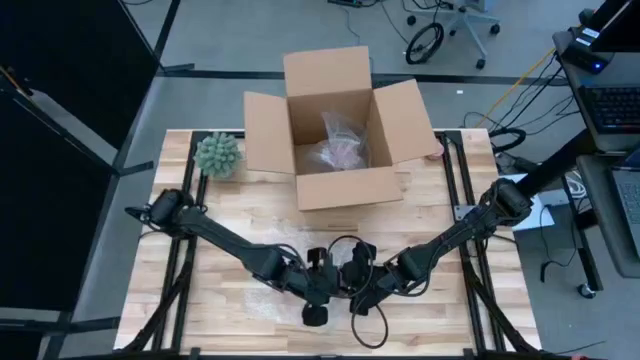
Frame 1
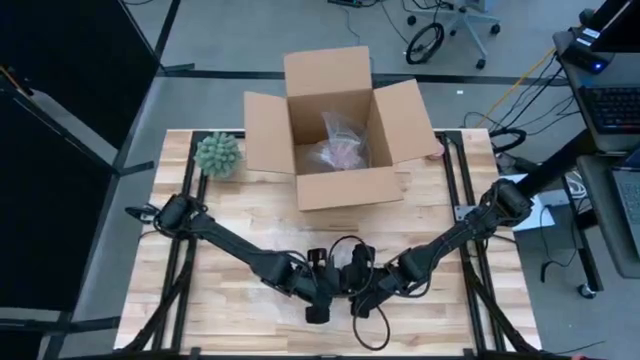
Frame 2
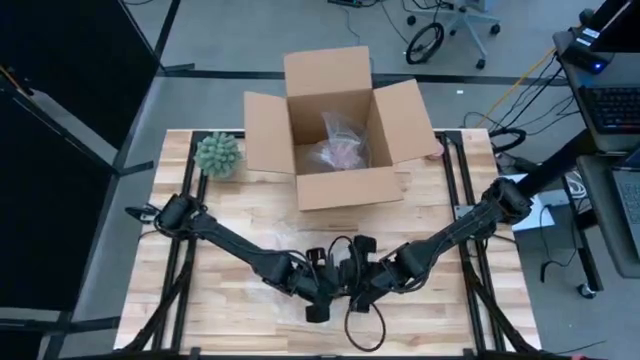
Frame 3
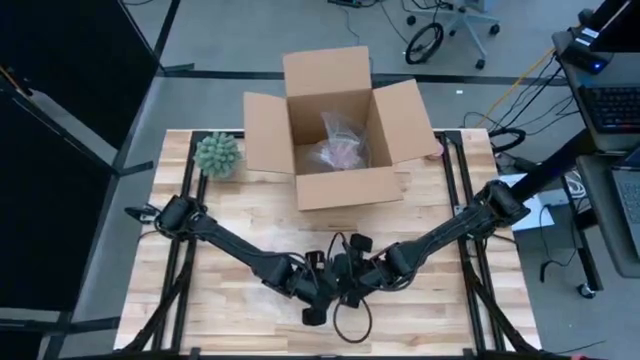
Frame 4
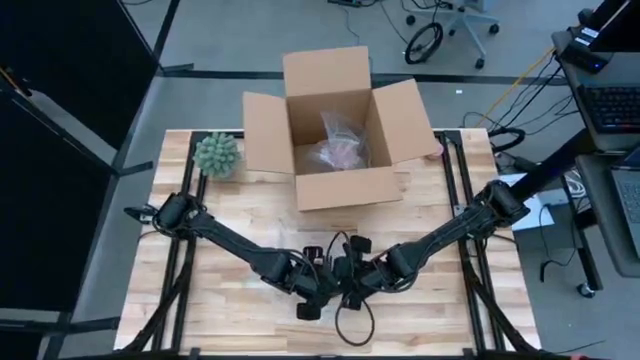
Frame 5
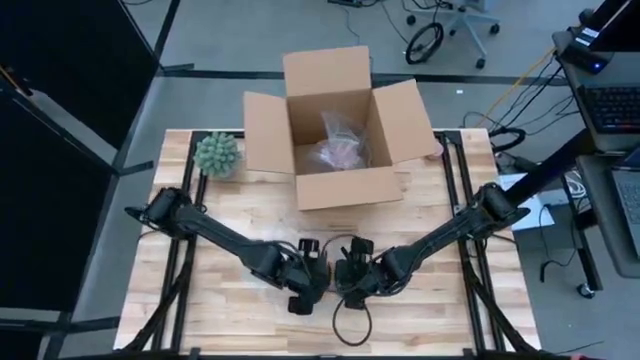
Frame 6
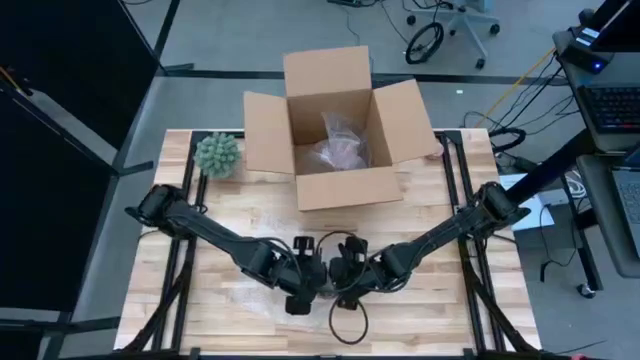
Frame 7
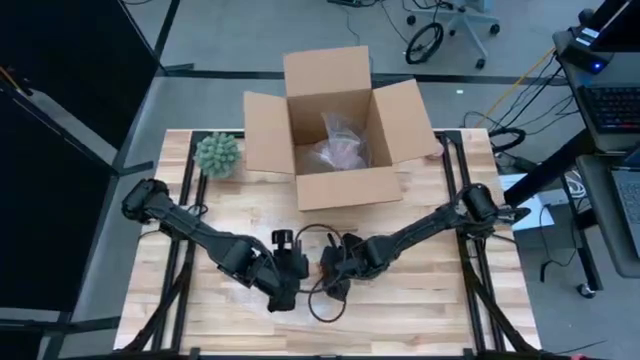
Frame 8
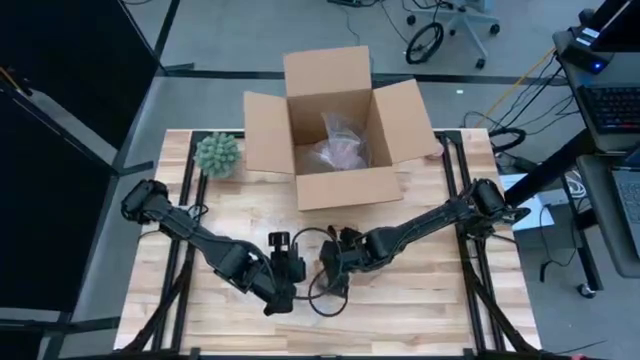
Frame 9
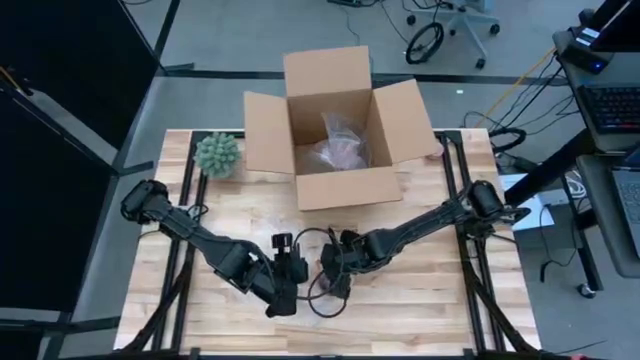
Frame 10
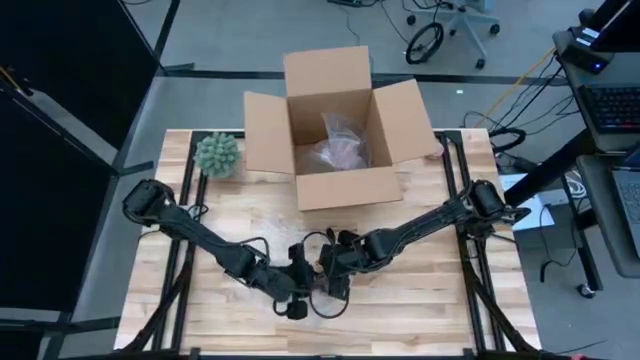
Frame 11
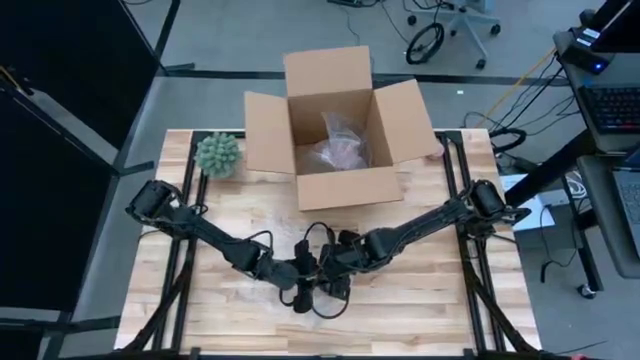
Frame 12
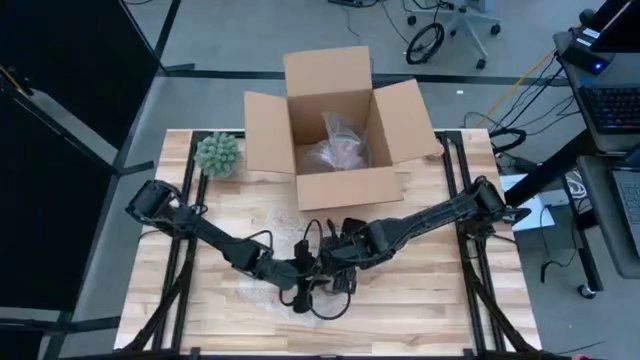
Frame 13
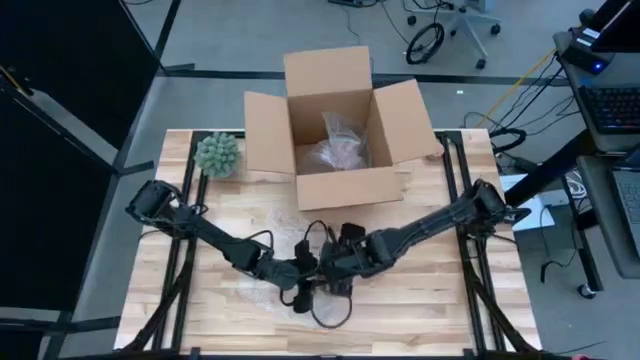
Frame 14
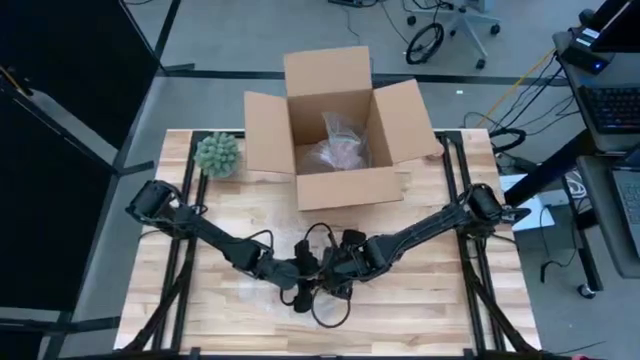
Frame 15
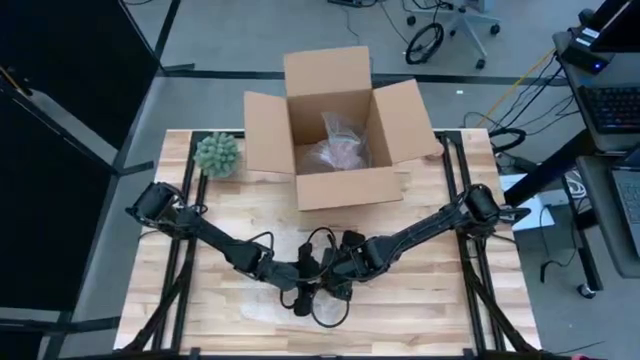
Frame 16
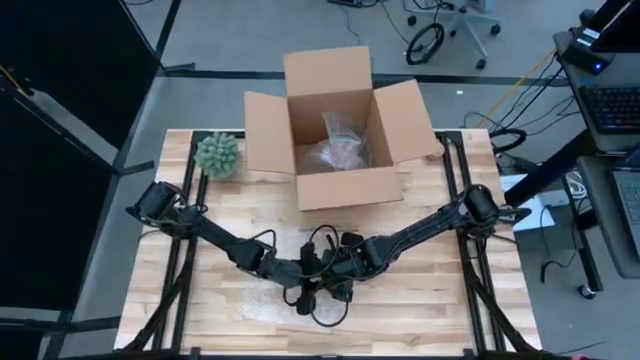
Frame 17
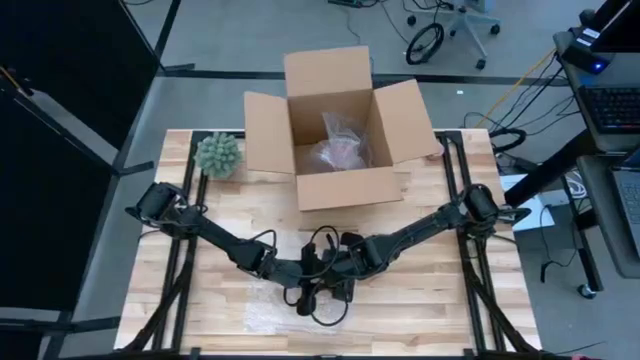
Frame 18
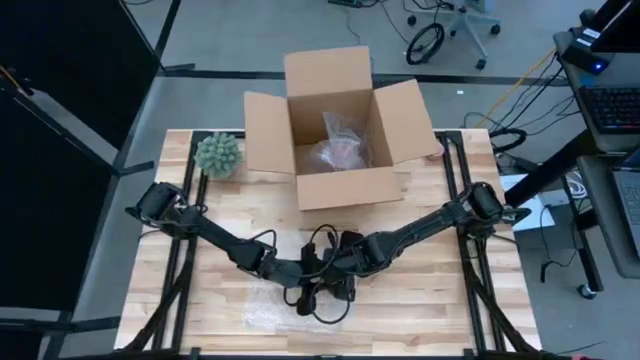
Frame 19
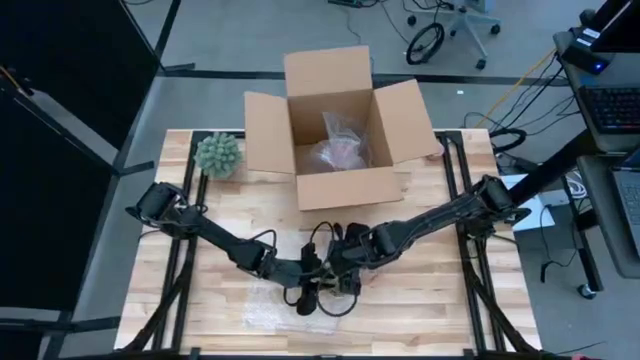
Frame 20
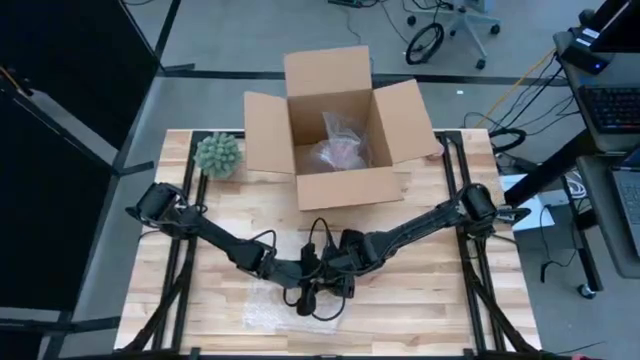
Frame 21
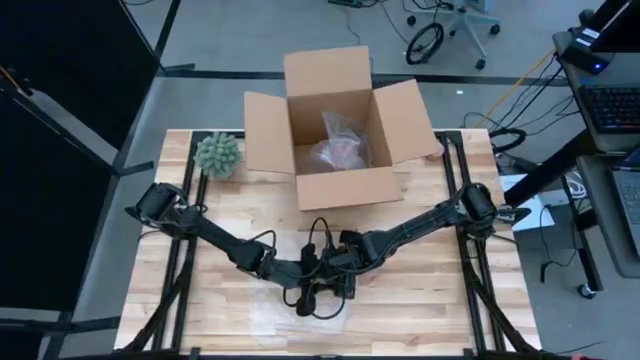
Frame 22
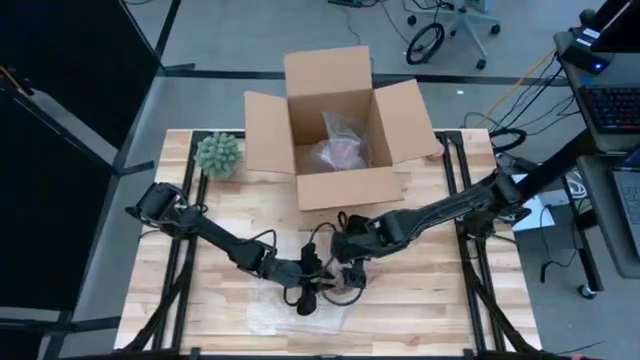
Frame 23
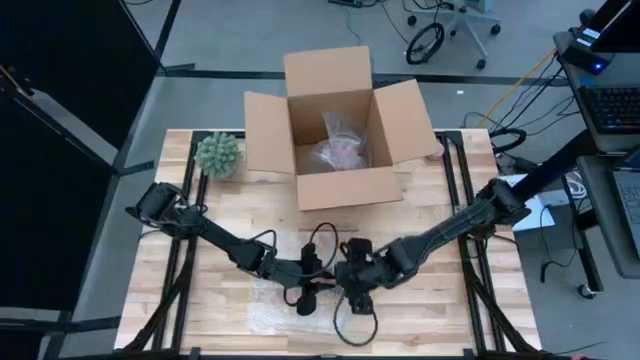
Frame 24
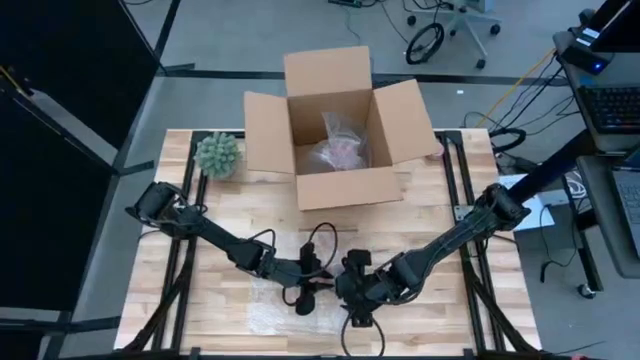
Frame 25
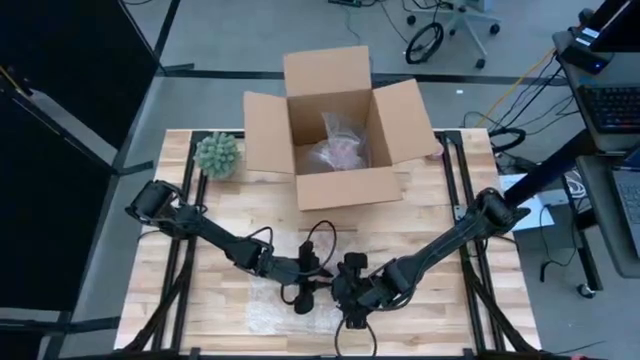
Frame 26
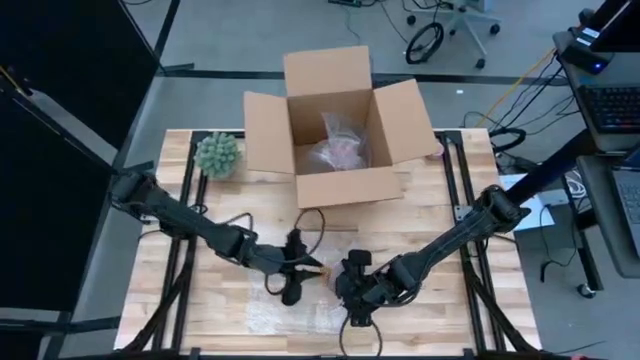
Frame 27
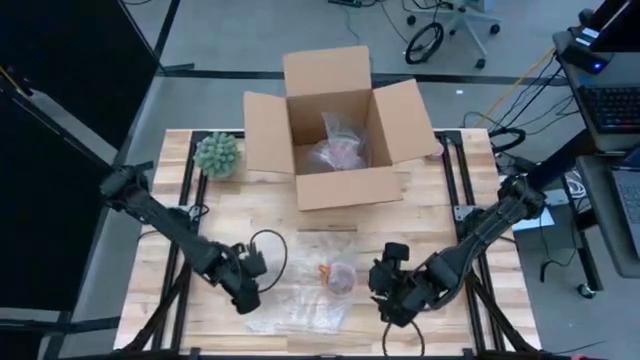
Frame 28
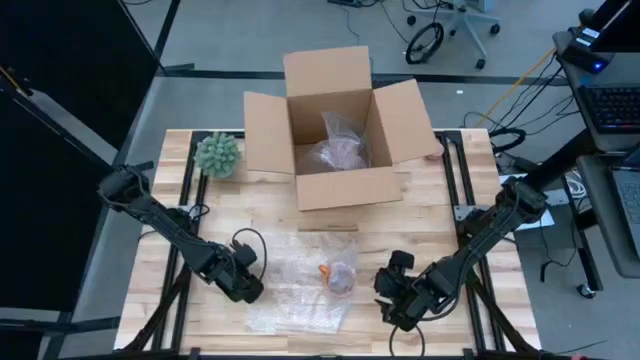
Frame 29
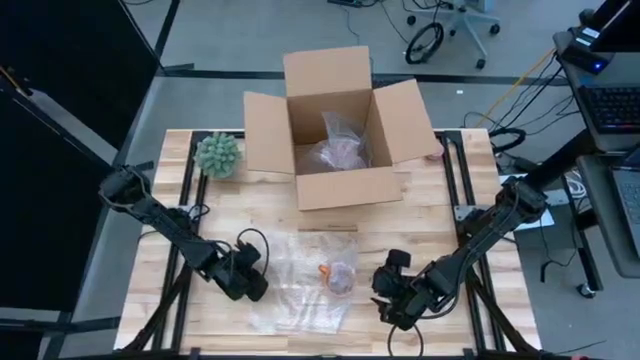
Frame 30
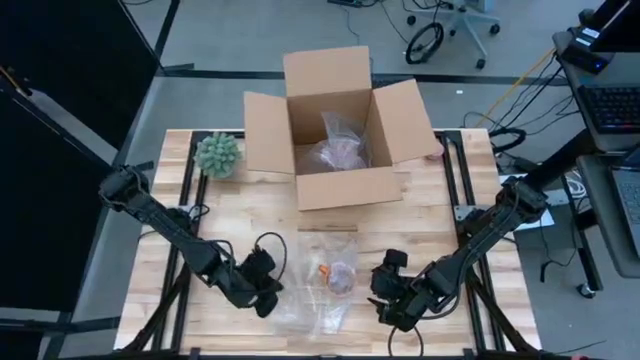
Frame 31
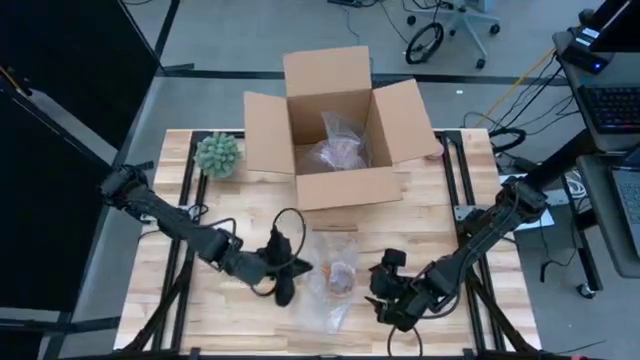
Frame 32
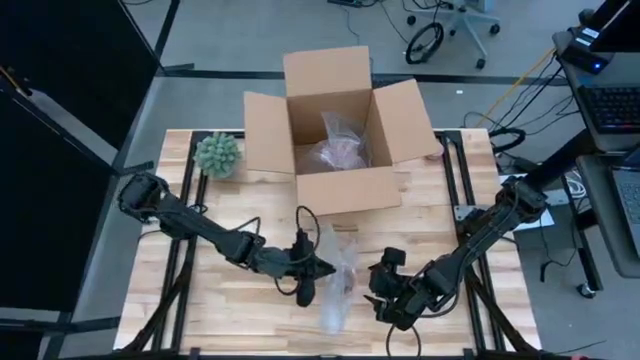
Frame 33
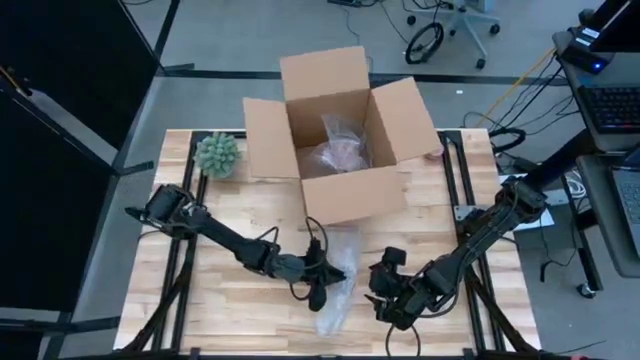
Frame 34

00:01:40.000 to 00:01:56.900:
Task: wrap mug
Wrap the orange mug with the left bubble wrap

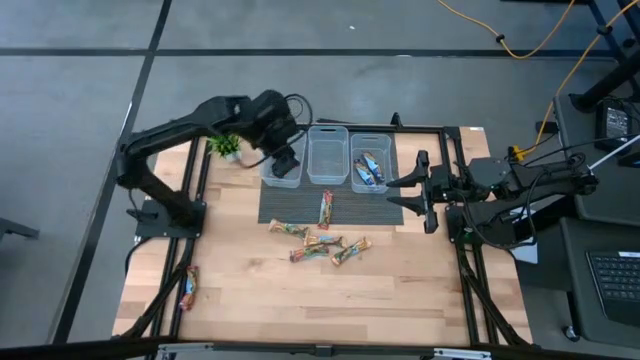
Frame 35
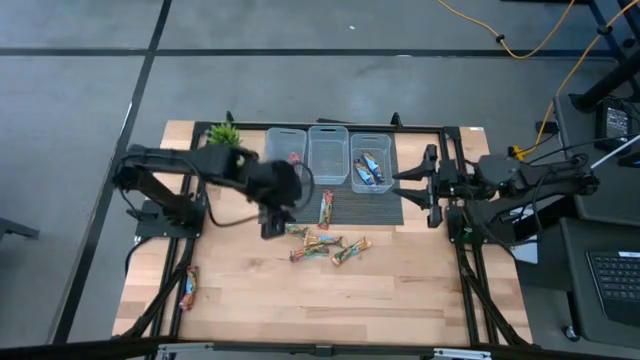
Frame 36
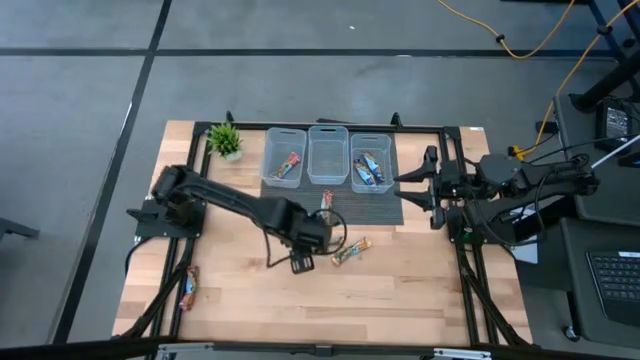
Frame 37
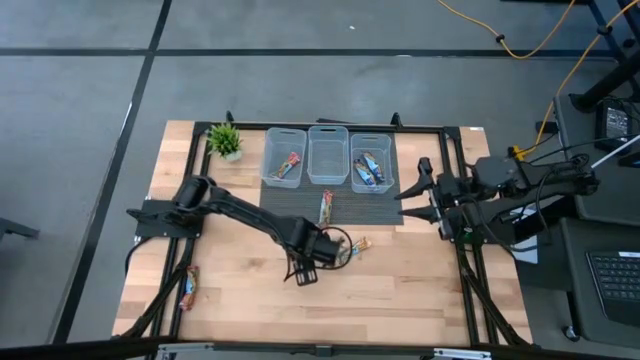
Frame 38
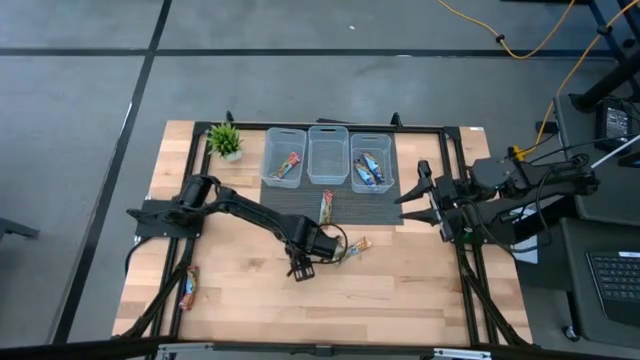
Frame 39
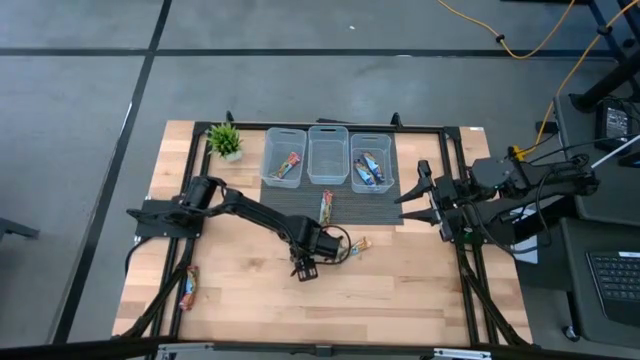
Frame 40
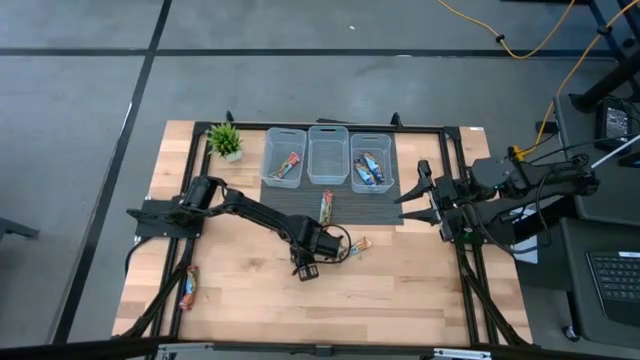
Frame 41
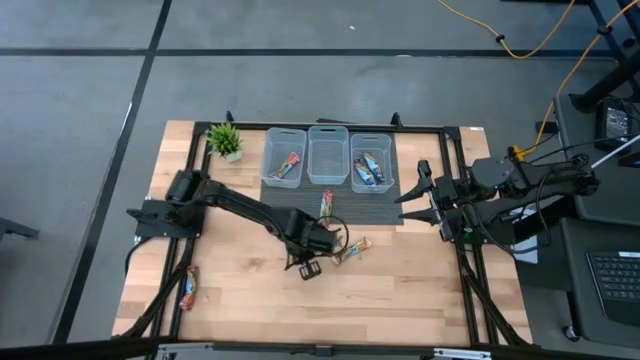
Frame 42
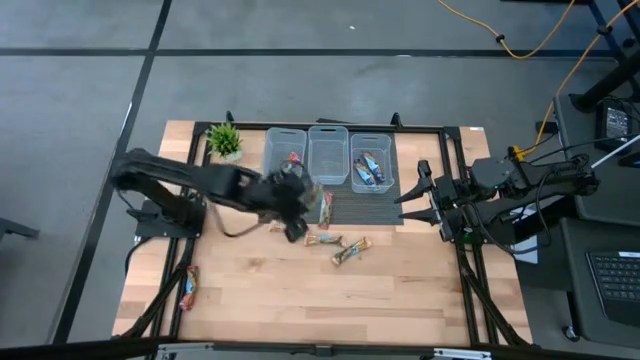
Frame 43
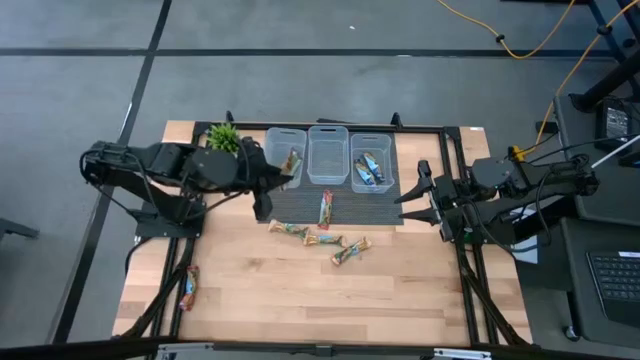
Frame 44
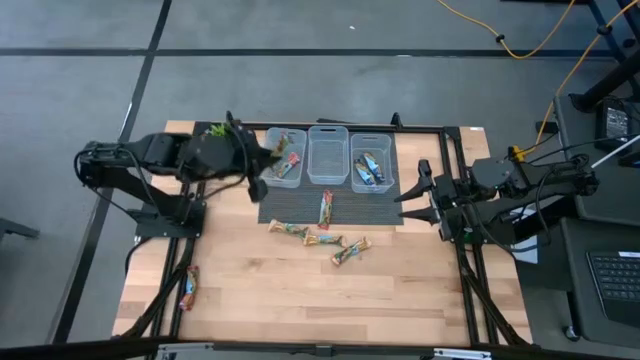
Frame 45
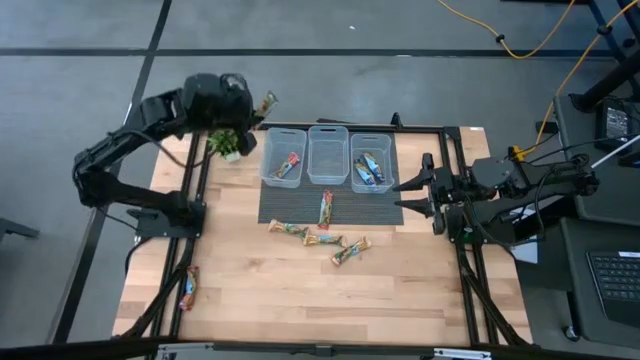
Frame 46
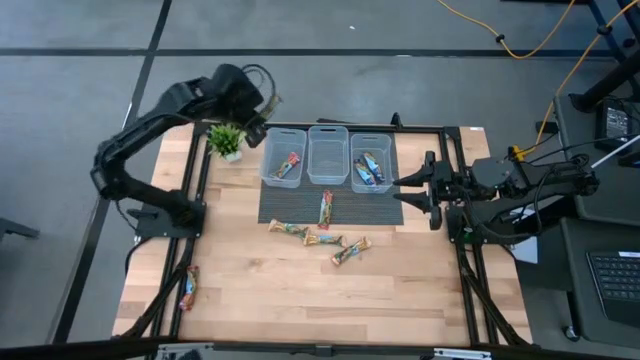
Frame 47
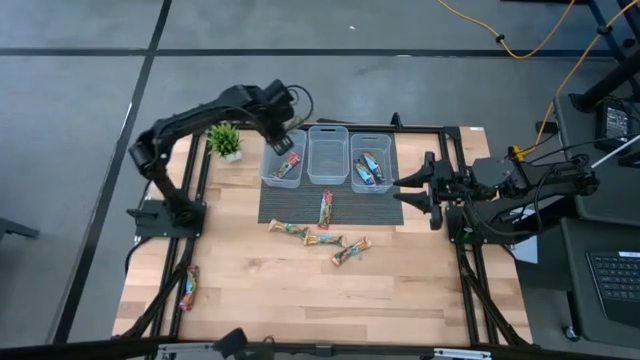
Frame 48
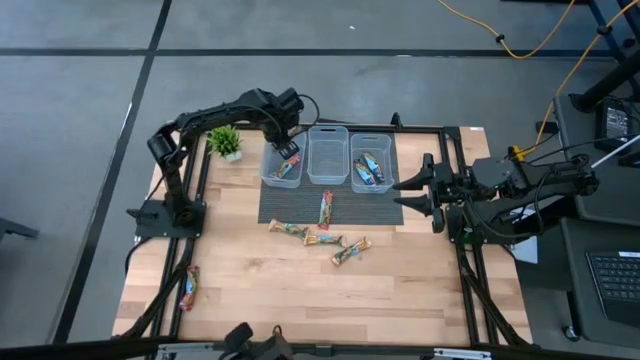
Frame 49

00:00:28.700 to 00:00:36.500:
Task: Pick and place Granola Bars by type
Put the bottom middle red snack bar into the left transparent bin
